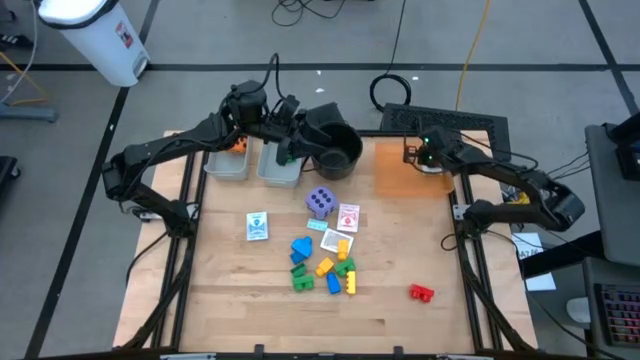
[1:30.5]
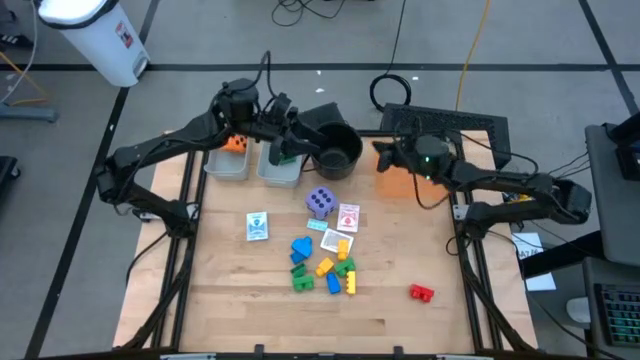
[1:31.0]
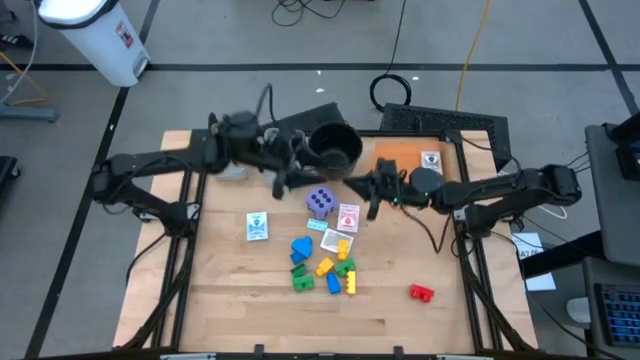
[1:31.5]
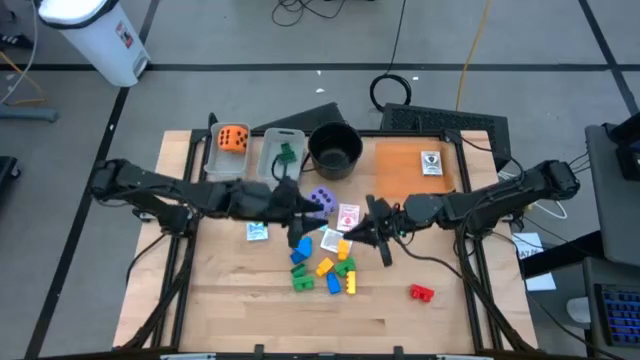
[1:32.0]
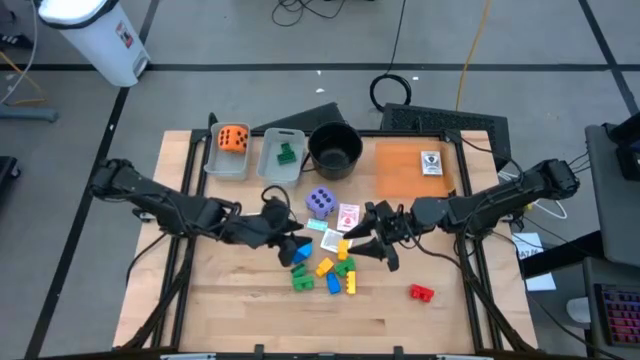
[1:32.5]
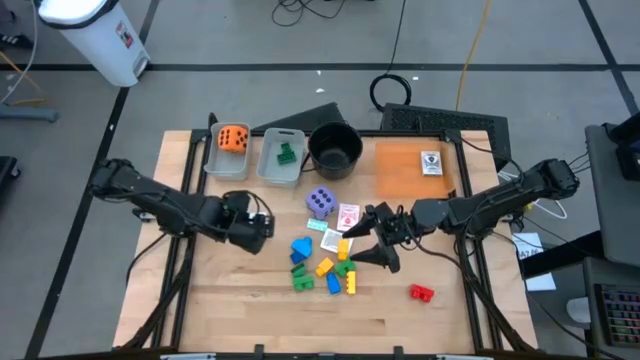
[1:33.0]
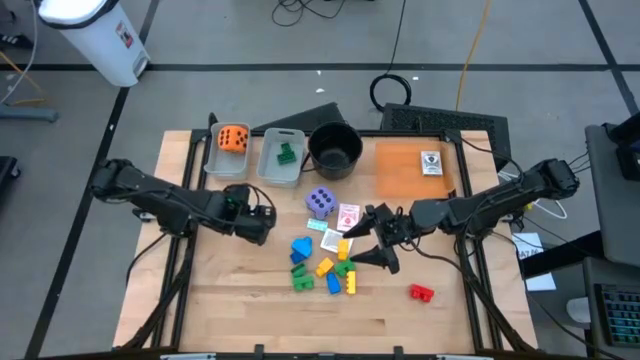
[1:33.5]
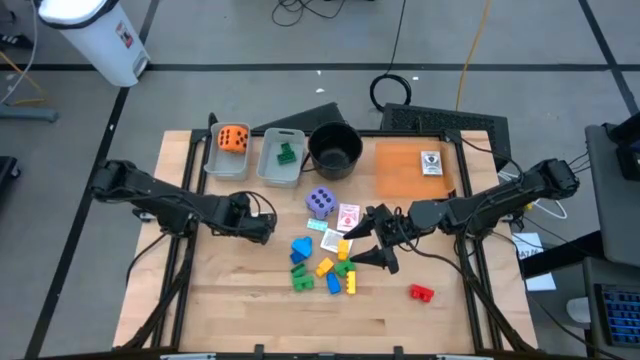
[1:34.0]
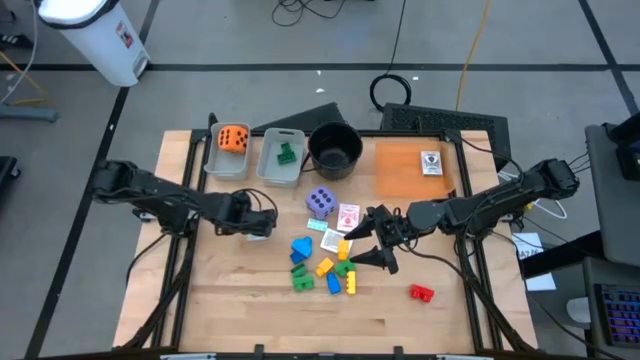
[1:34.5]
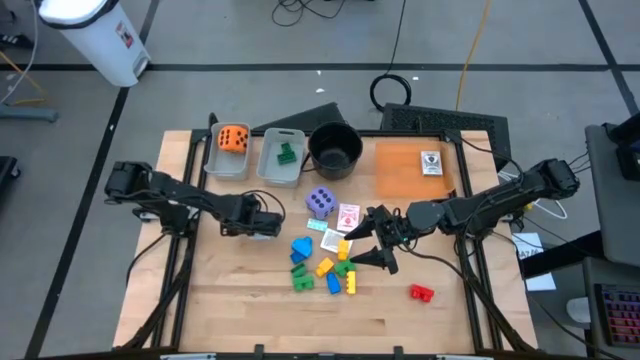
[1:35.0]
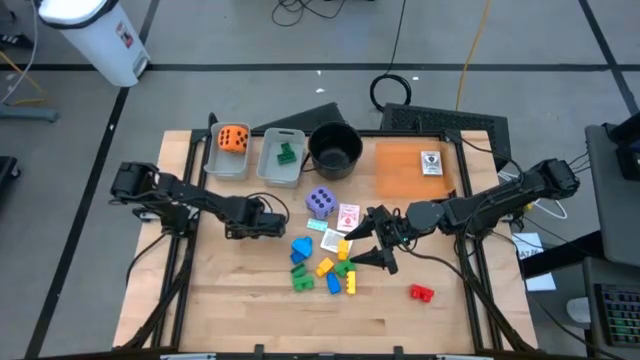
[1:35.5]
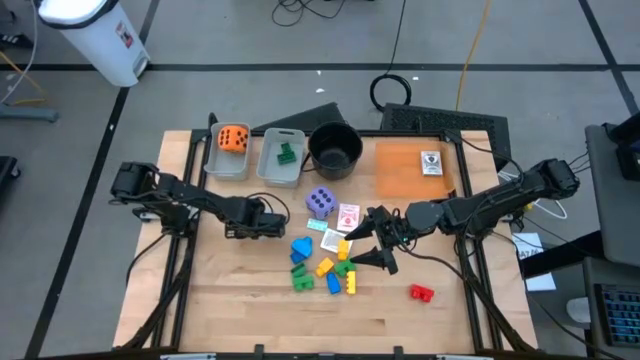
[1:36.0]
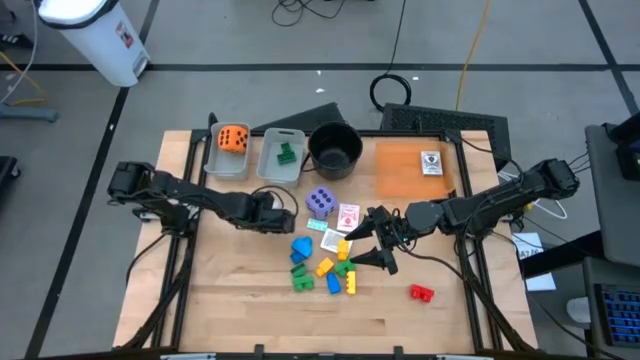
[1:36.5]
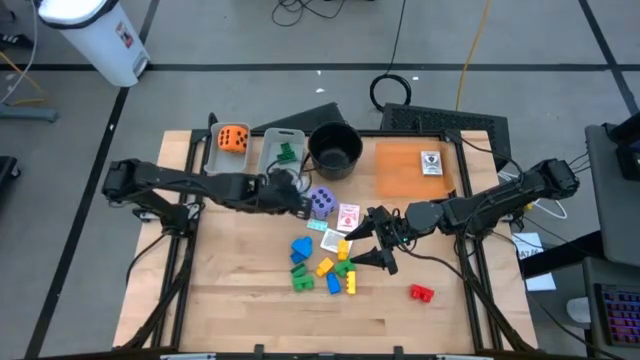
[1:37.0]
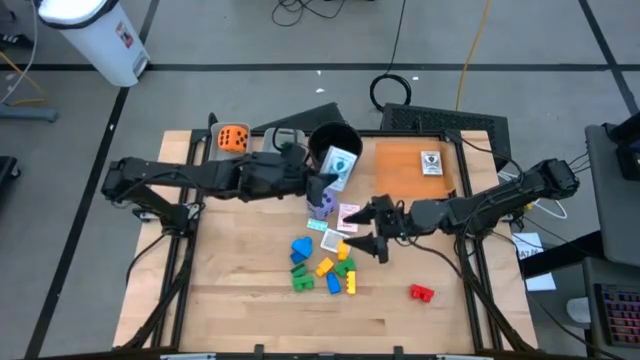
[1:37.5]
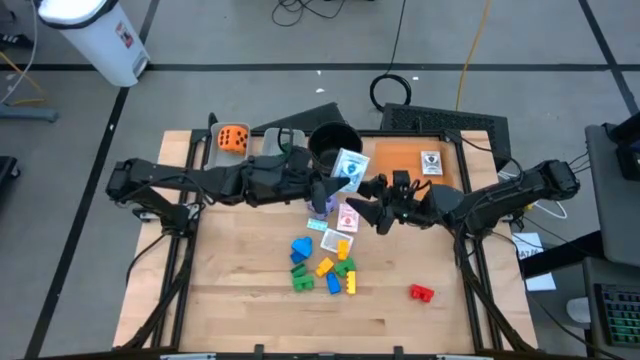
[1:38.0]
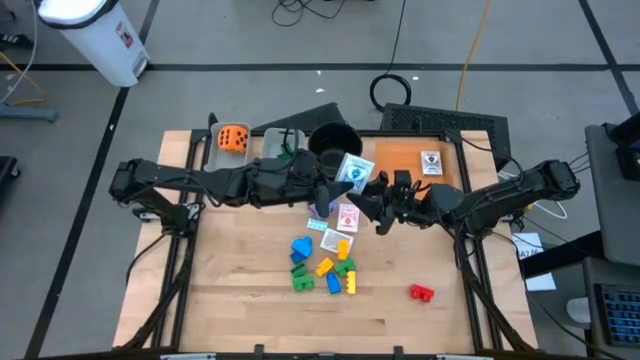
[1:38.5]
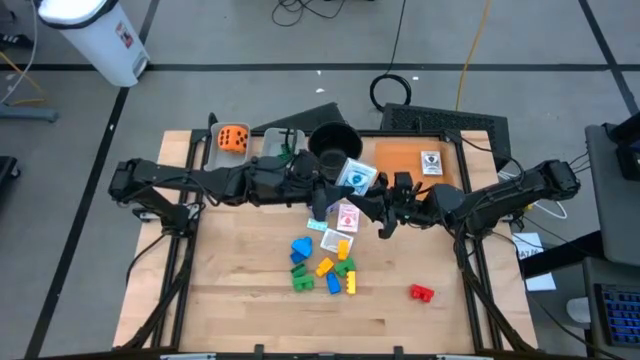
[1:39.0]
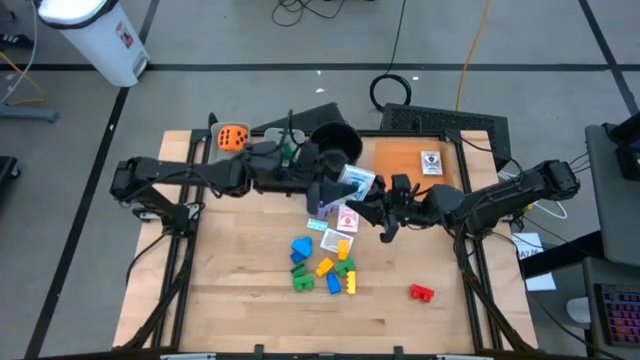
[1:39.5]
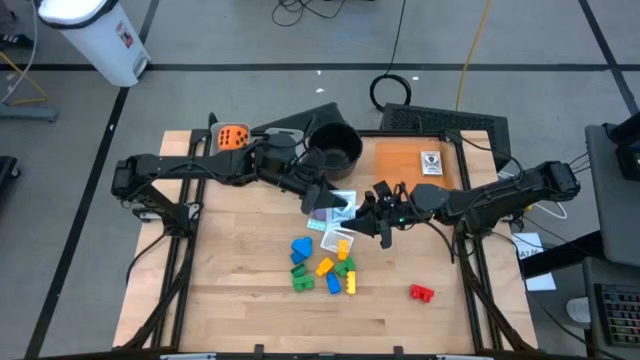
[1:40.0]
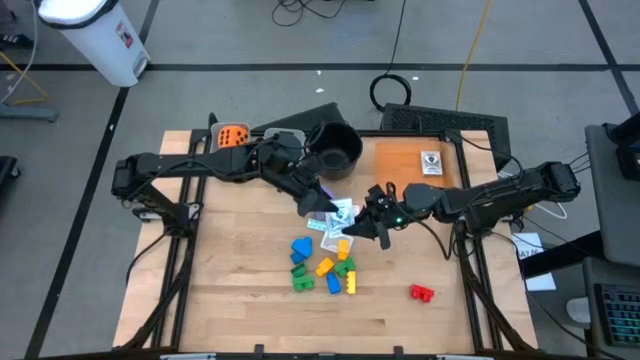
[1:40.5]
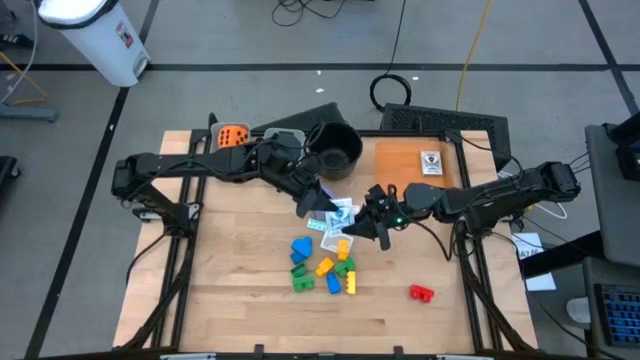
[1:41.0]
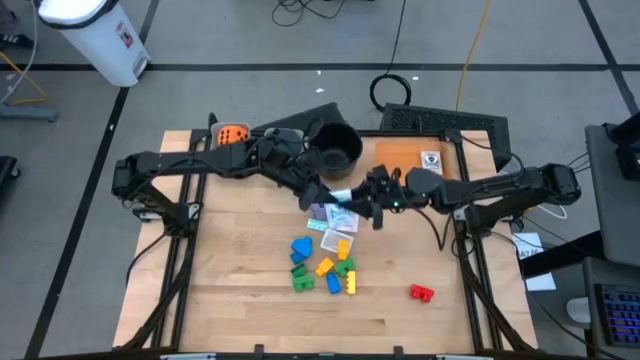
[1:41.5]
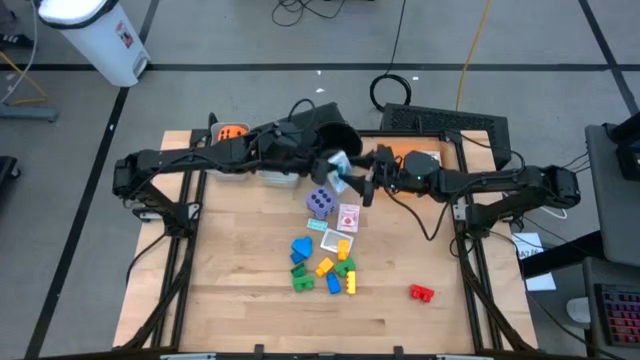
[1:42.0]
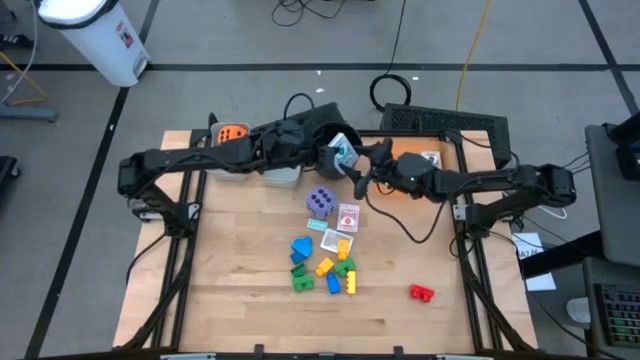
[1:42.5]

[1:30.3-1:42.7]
Task: Pick & Place Toys
Put the blue deck of cards into the orange bin

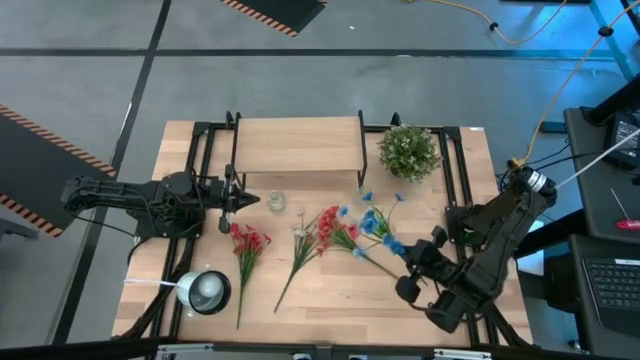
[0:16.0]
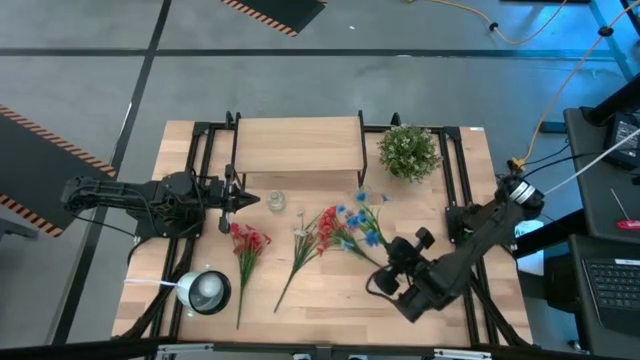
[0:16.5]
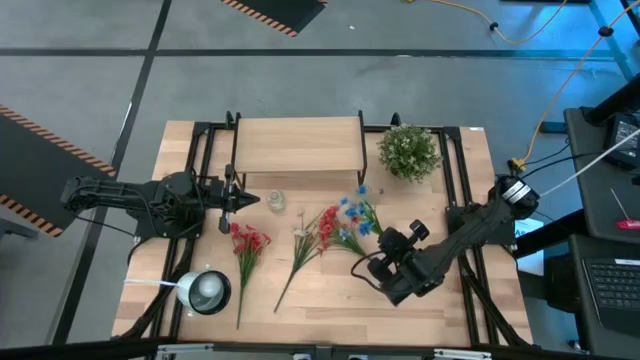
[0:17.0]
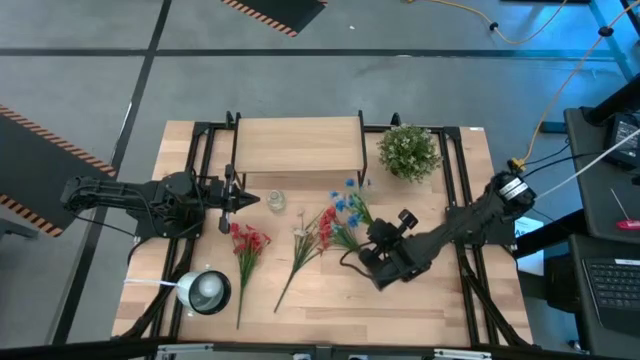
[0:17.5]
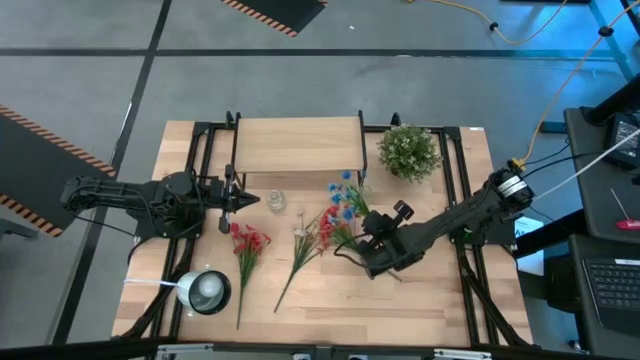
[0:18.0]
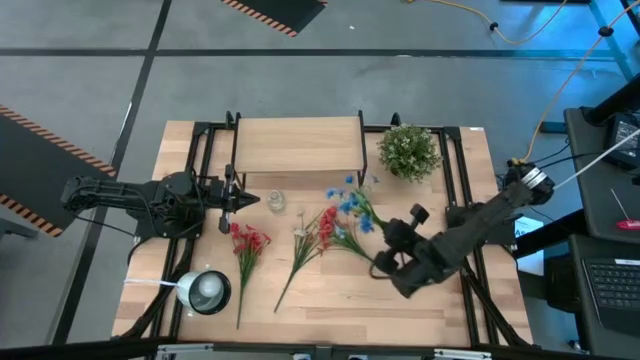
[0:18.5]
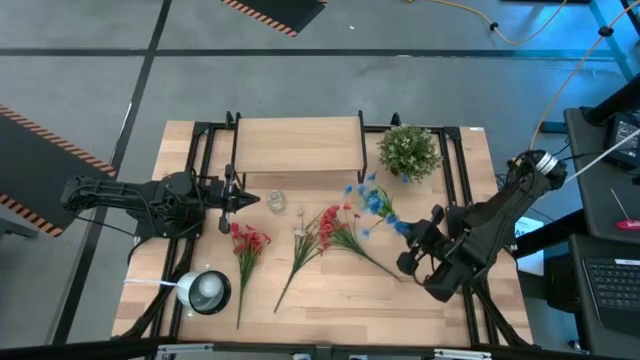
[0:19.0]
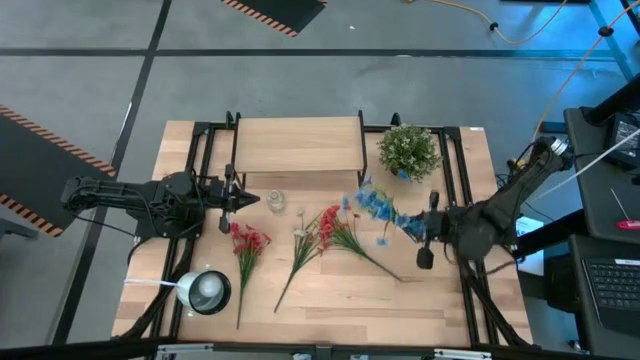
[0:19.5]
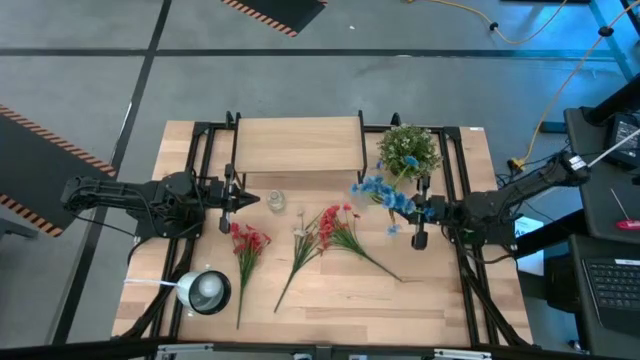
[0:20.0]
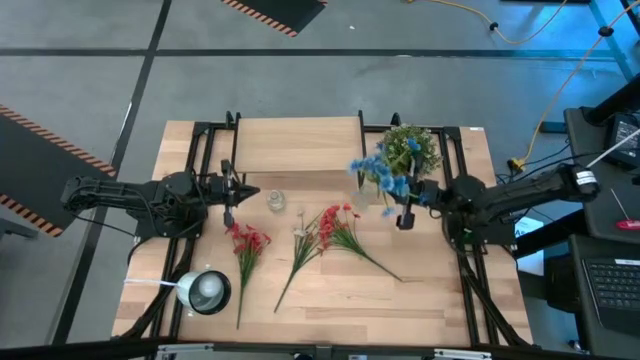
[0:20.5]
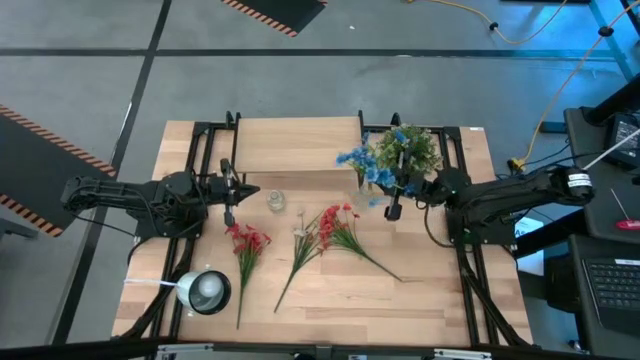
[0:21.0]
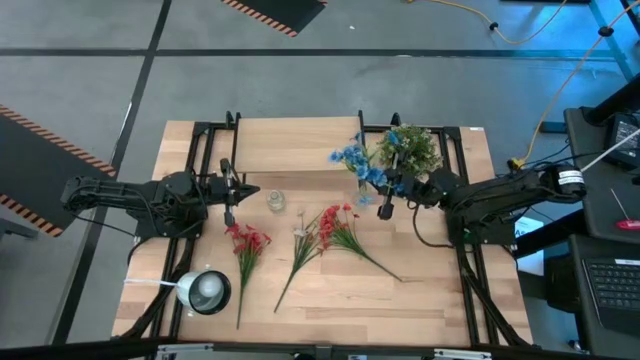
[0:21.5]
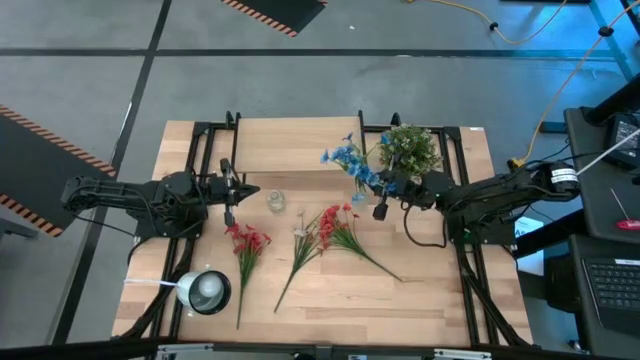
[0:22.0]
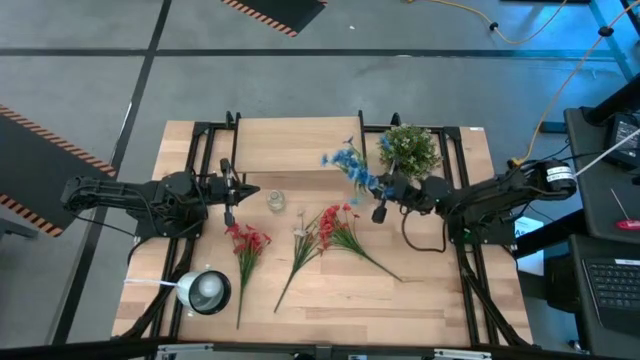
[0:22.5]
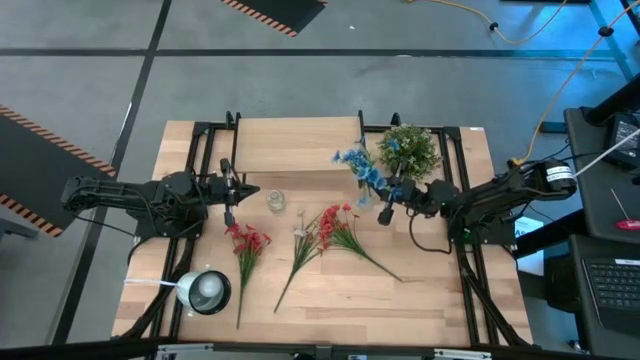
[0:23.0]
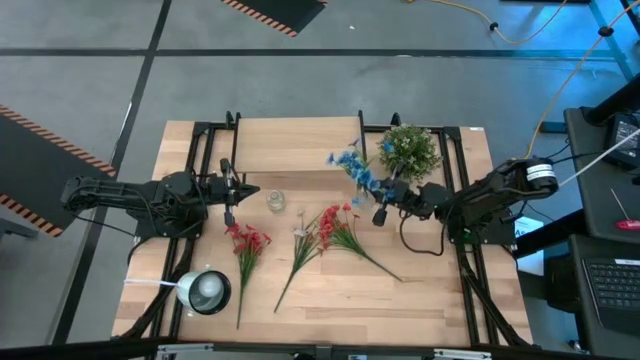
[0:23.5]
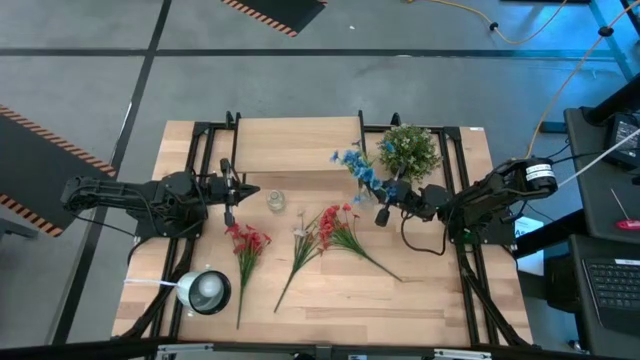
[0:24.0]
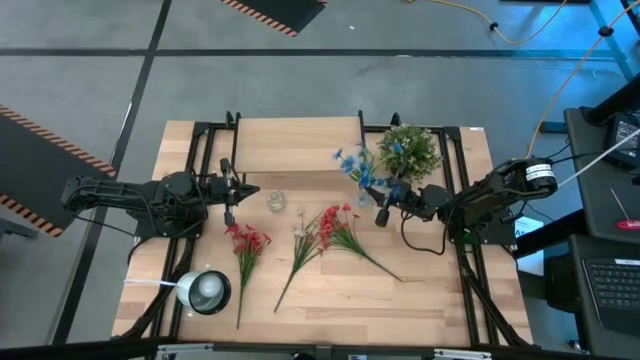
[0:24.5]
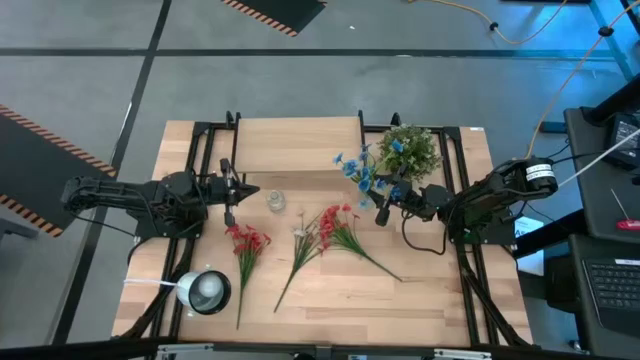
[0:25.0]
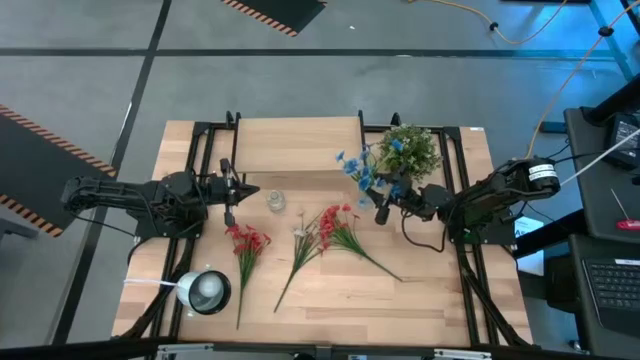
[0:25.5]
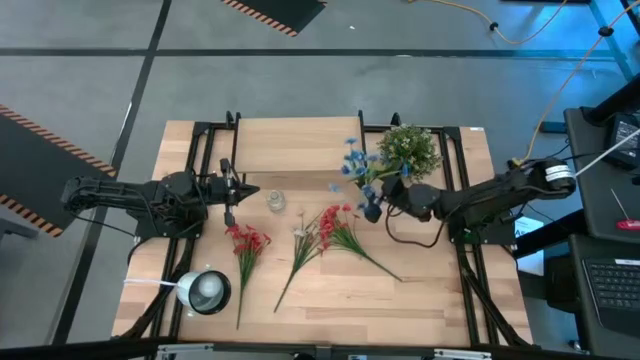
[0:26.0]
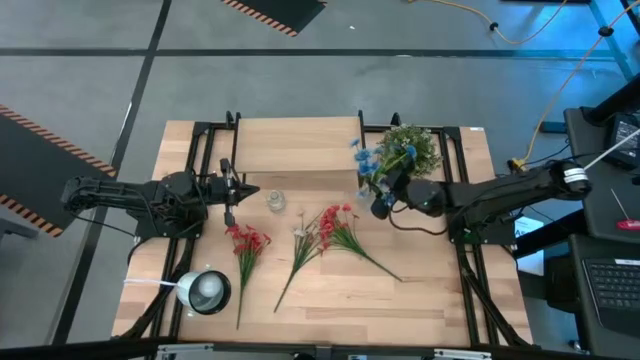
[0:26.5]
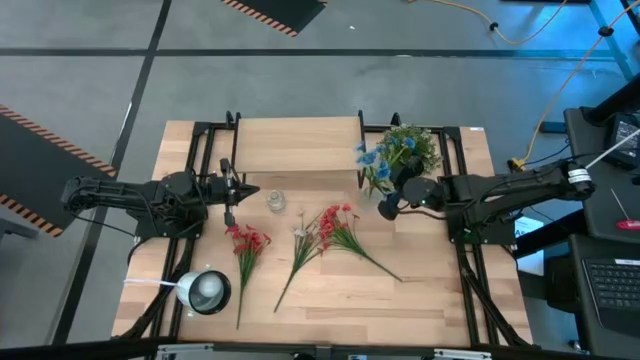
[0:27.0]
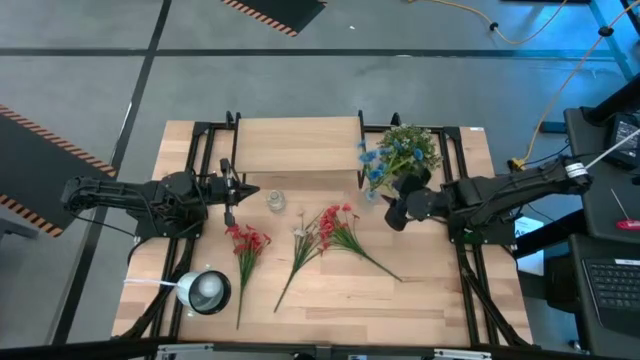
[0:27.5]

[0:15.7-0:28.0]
Task: Pick and place flowers into a vace then onto a shelf
Put the blue flowers into the right transparent vase
